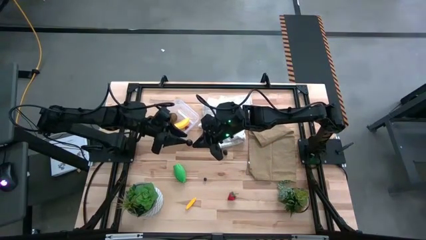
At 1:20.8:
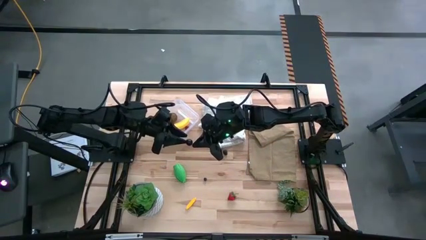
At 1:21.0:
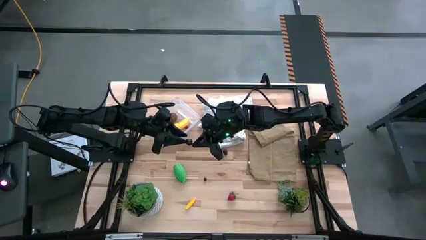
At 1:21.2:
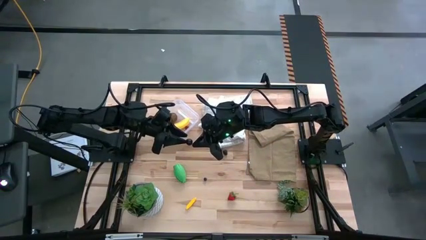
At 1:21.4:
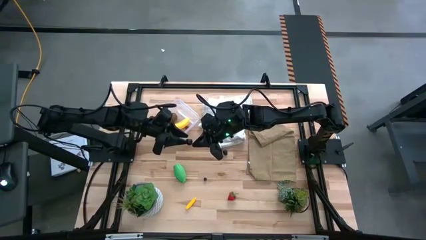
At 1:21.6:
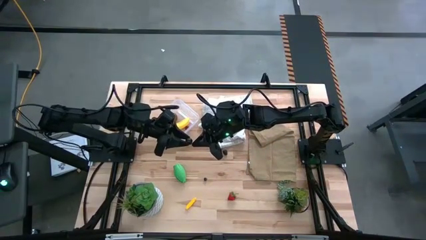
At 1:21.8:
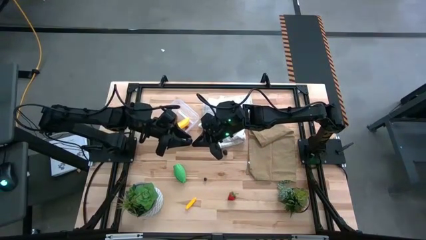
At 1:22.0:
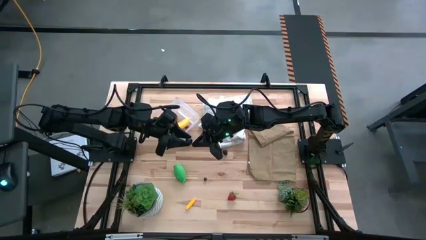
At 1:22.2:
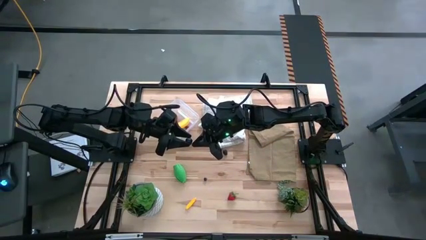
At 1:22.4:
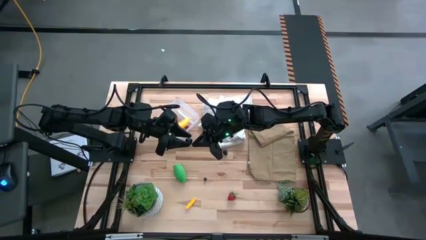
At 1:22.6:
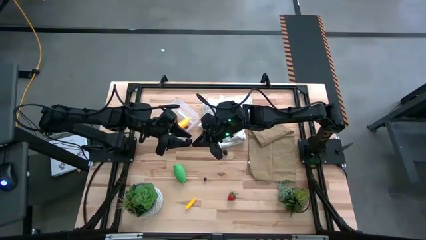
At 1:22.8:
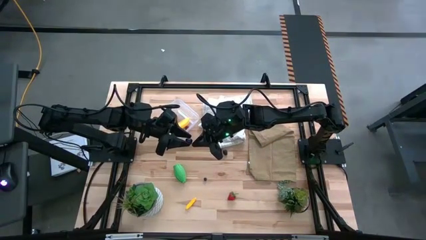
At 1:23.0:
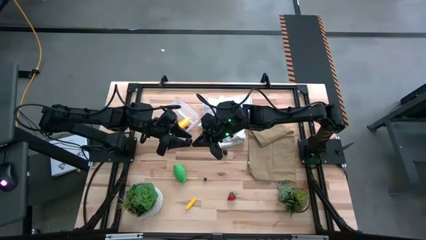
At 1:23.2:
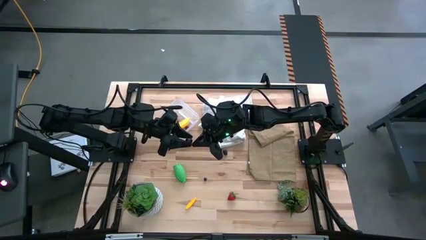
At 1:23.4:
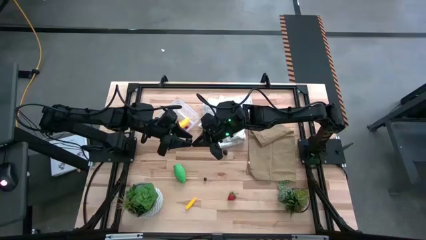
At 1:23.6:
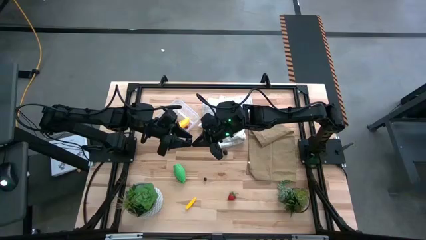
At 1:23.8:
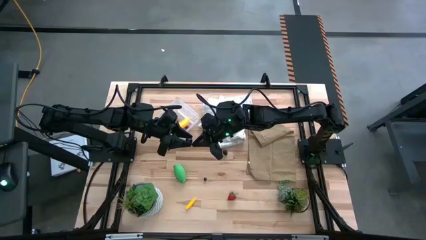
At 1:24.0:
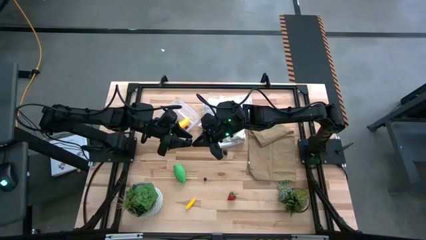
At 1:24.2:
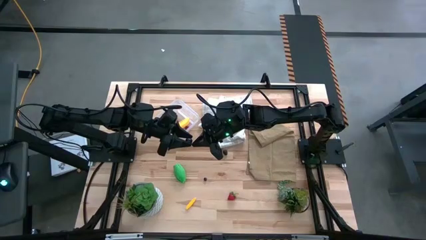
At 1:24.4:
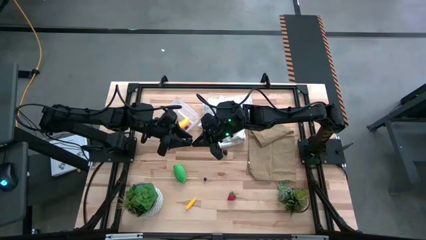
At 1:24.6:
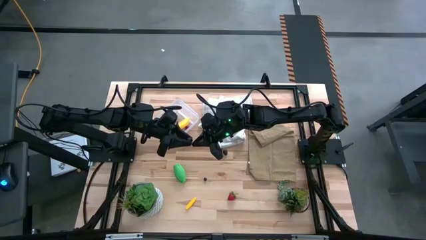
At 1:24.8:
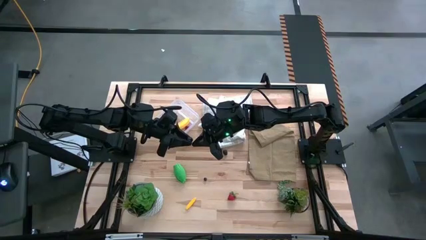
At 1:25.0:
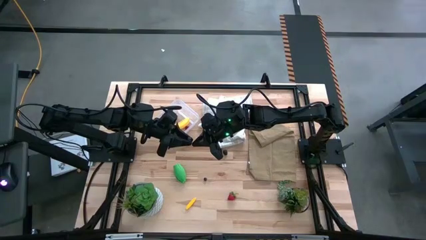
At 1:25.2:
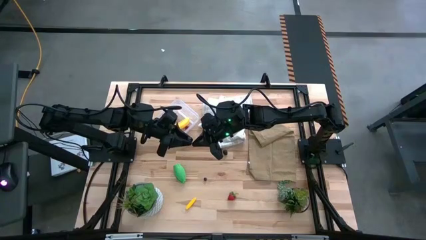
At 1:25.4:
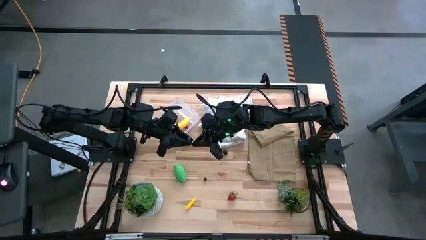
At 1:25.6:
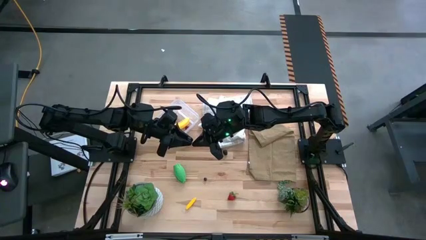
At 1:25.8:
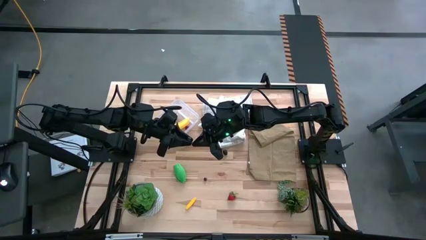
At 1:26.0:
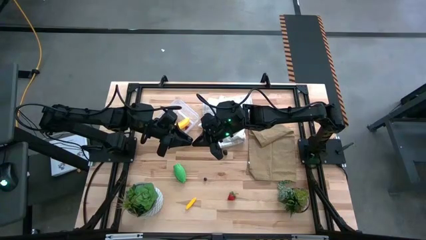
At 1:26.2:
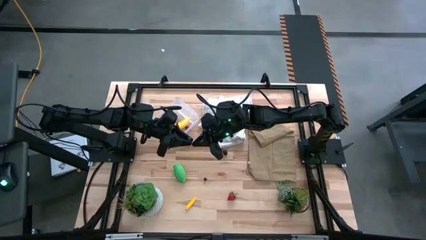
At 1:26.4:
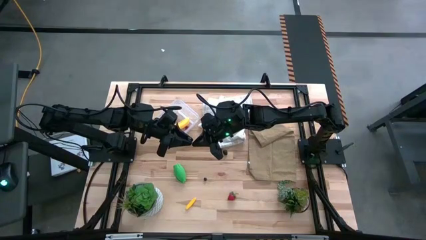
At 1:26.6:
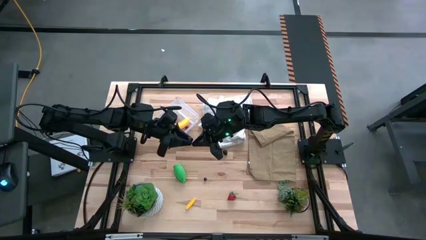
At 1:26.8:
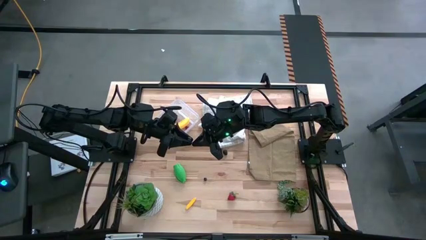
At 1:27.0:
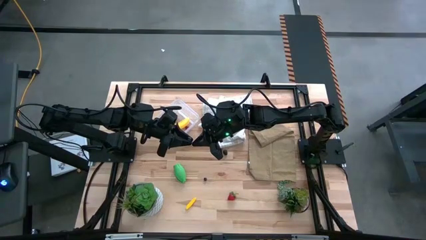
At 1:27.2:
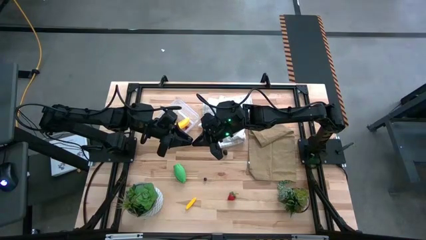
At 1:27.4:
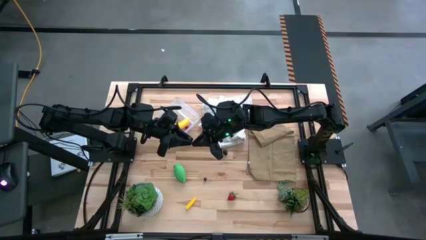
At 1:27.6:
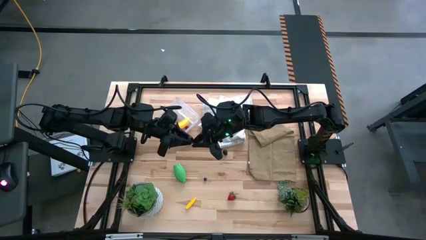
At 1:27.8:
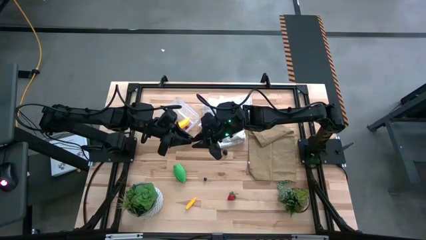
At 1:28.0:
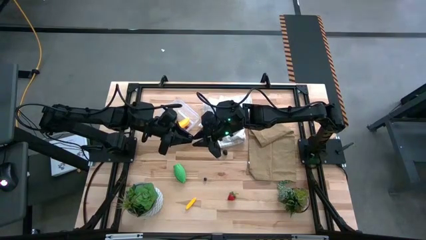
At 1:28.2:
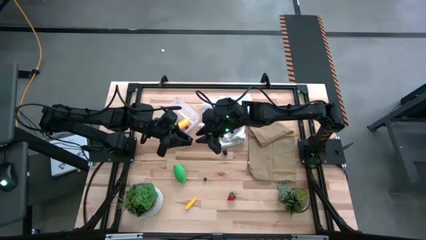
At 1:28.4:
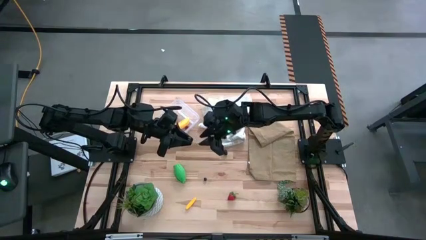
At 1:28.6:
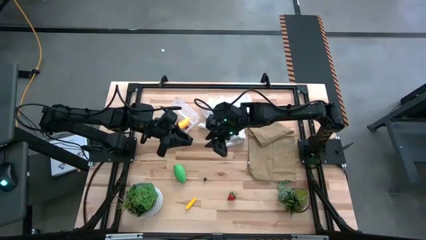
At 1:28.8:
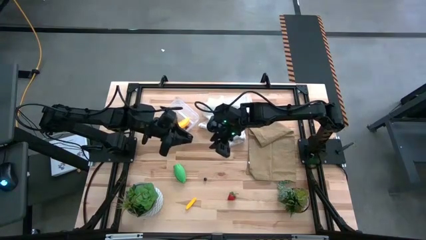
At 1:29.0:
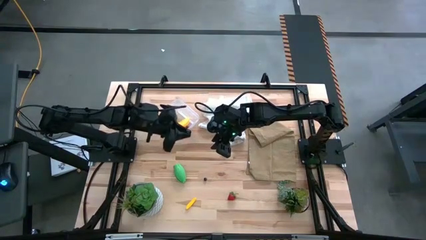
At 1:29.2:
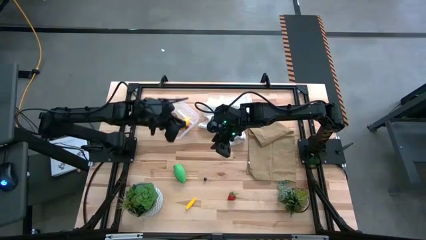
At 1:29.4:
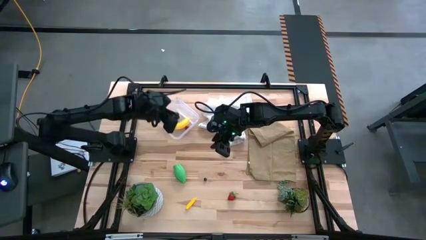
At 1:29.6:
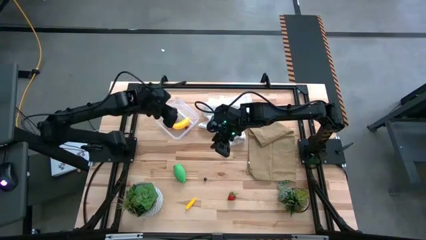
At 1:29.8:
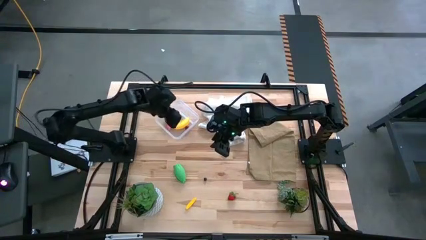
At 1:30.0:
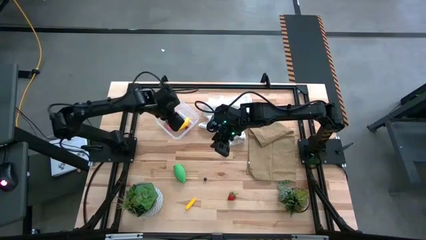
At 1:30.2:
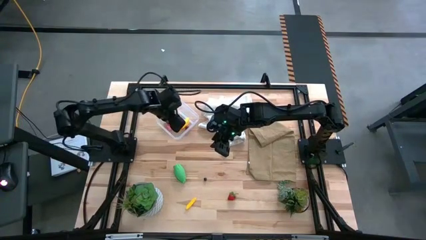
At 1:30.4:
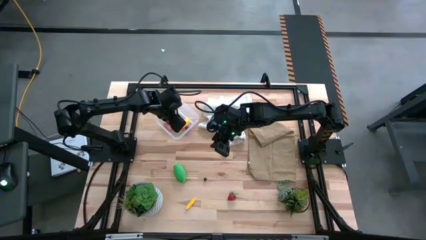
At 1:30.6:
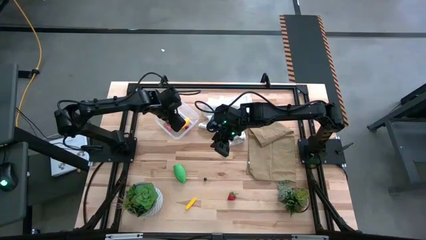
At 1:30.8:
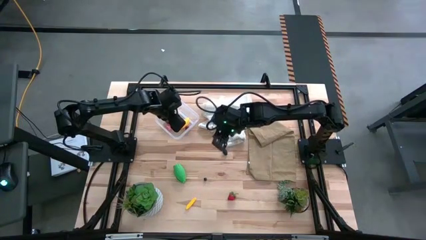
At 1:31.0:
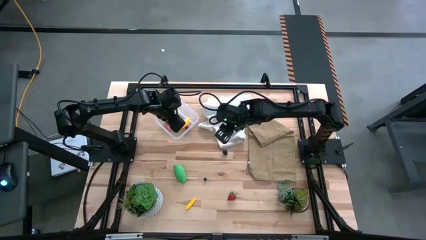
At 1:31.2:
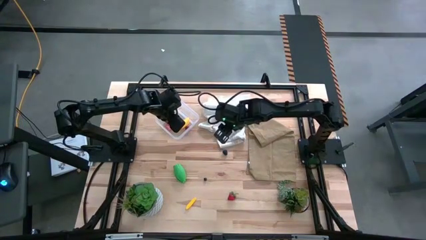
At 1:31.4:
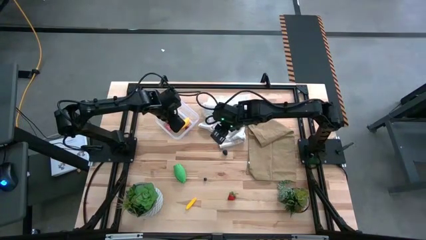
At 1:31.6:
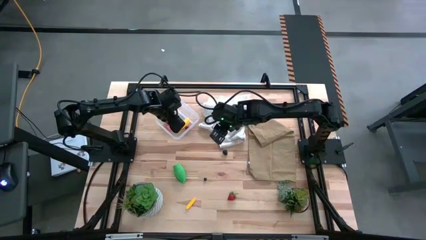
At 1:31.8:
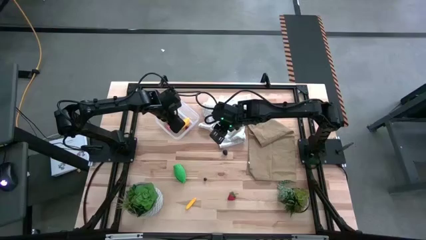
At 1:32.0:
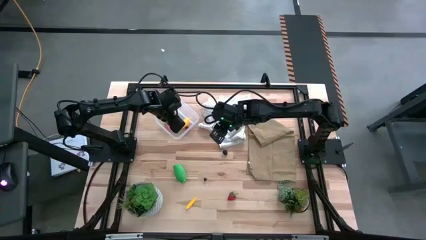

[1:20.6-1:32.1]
Task: Pick and placing Produce into tupperware
Put the black cherry into the transparent bin

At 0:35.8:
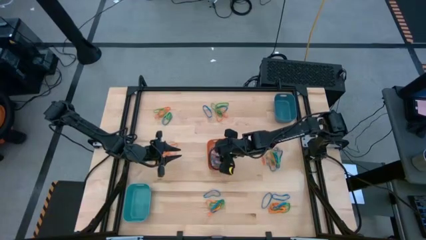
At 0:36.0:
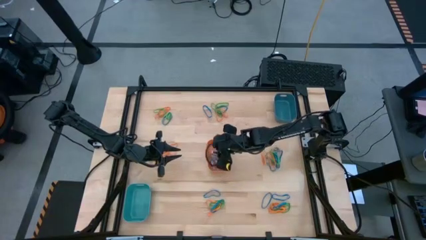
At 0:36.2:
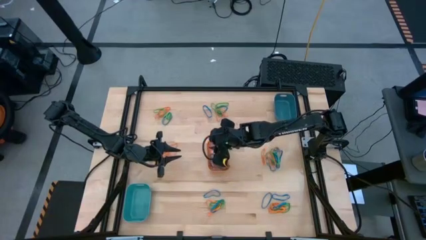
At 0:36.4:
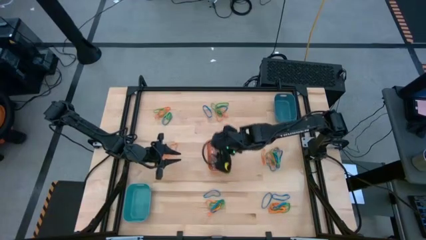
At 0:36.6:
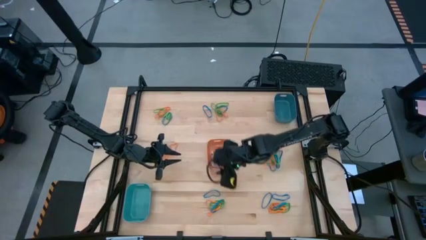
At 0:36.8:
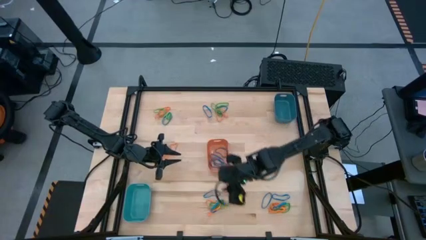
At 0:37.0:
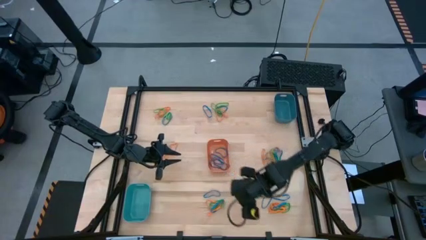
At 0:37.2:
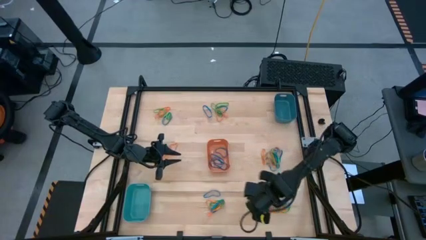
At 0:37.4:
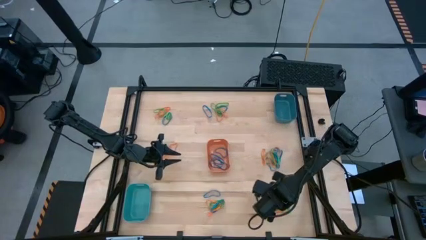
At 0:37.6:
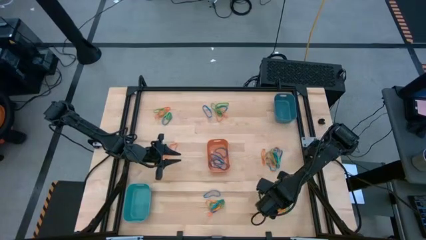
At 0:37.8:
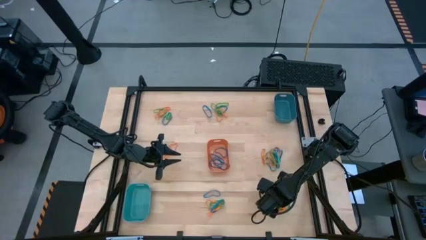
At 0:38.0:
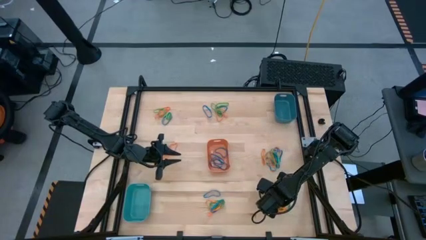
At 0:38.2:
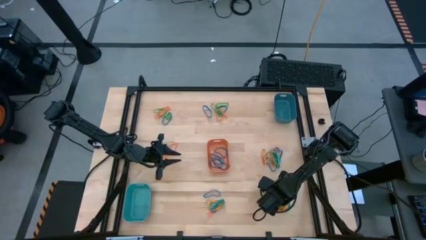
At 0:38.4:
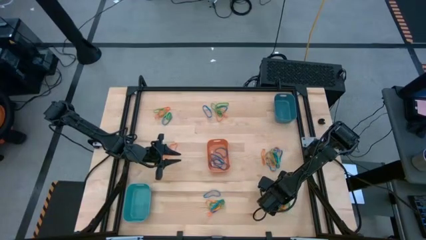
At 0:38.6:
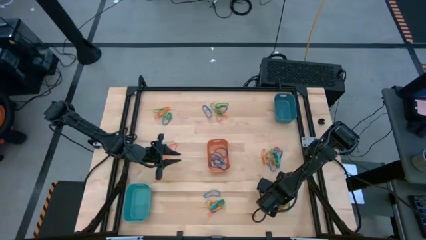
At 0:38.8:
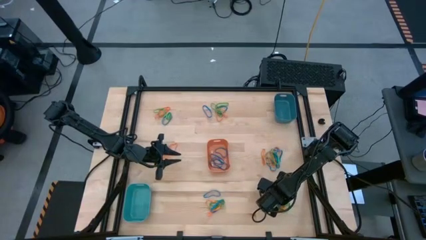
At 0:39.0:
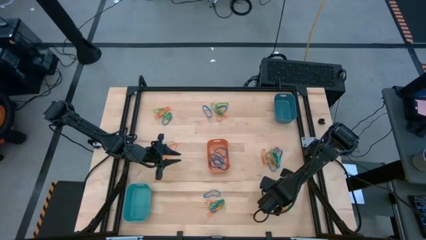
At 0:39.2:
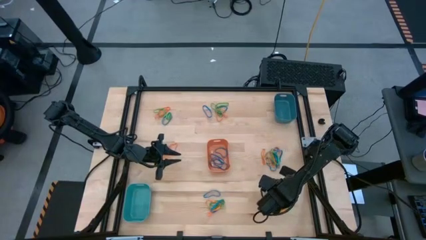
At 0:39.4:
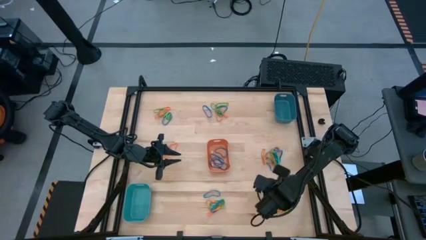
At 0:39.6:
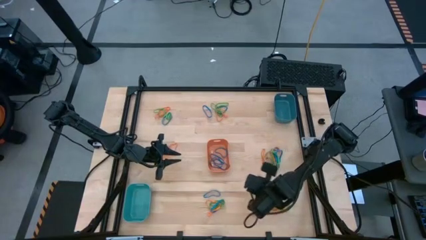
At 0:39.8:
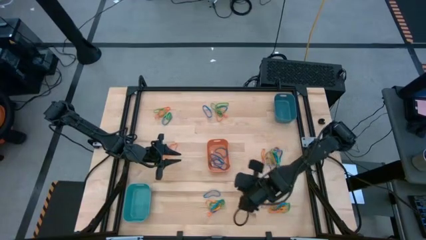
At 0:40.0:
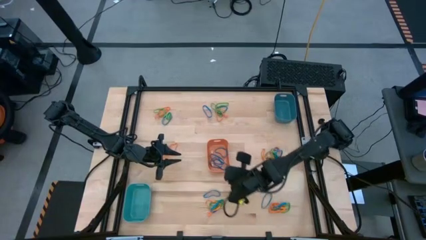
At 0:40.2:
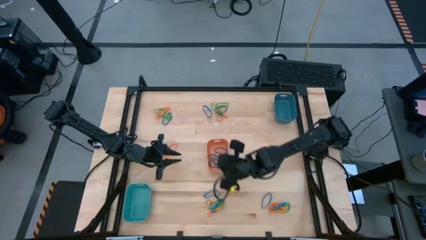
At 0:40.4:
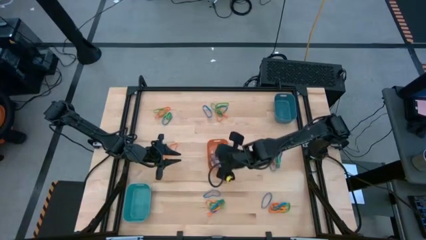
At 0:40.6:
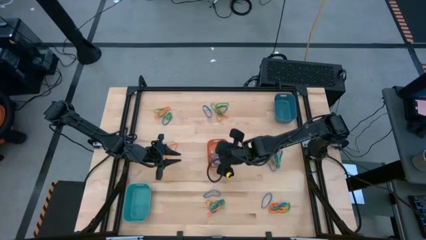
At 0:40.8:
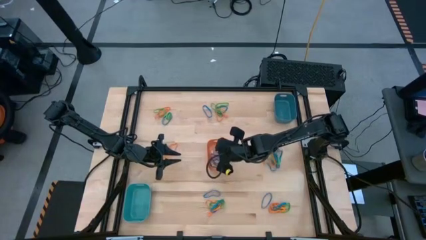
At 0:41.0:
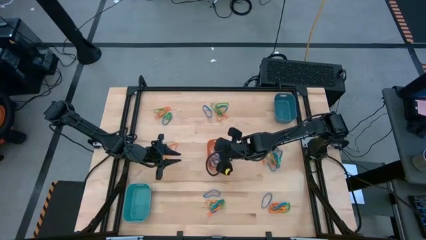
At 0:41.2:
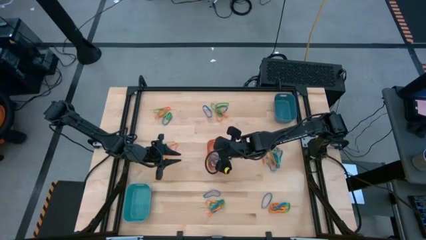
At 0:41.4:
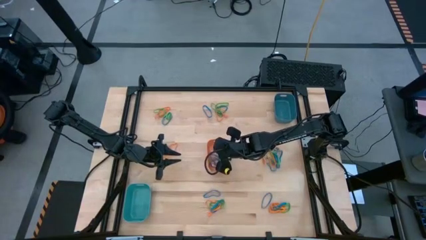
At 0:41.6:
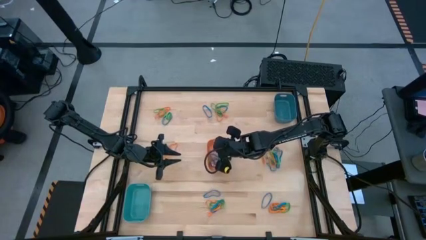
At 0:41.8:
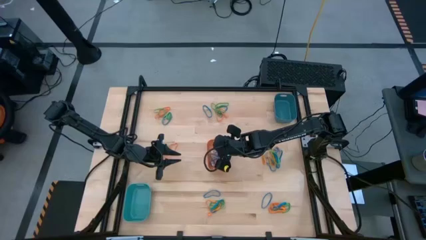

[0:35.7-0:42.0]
Task: Sort rubber bands into baskets
Put the blue rubber band into the orange bin
